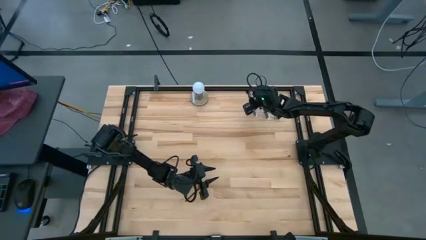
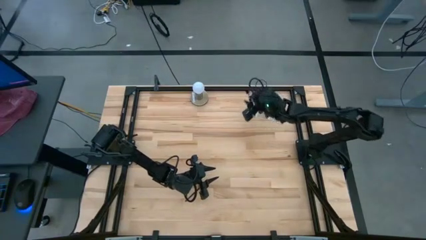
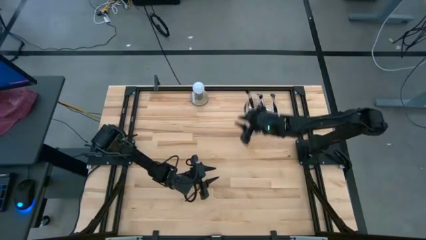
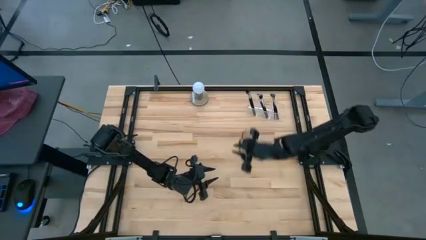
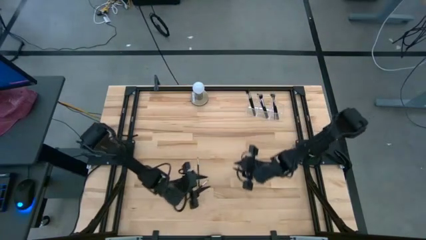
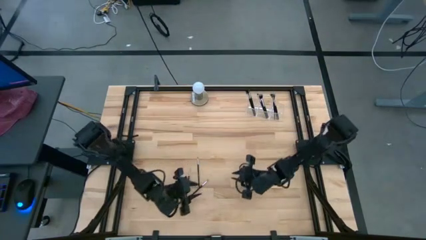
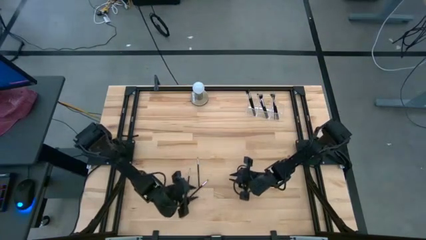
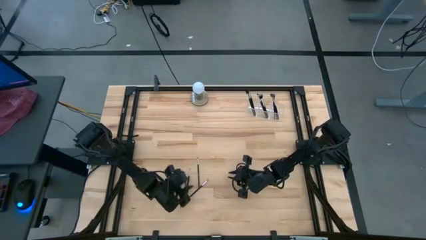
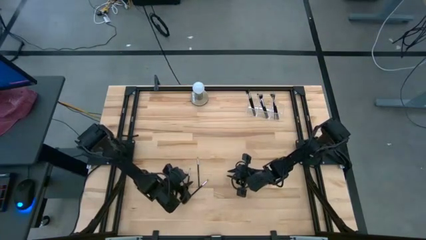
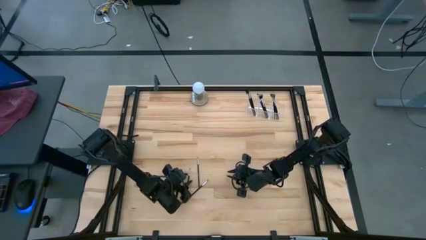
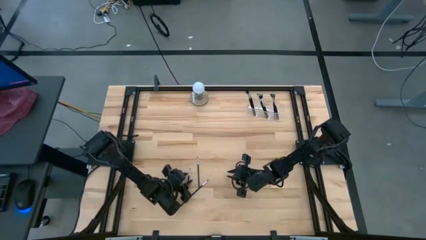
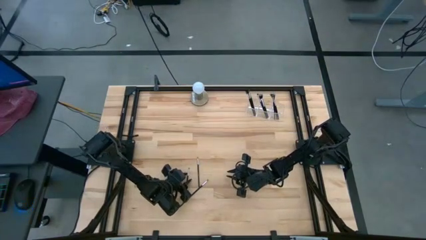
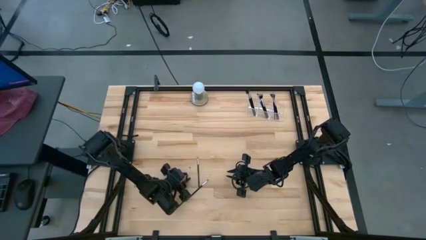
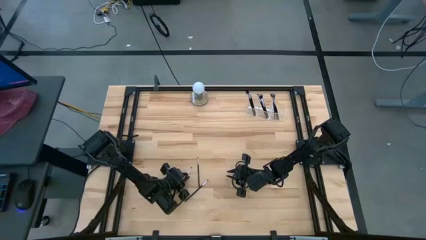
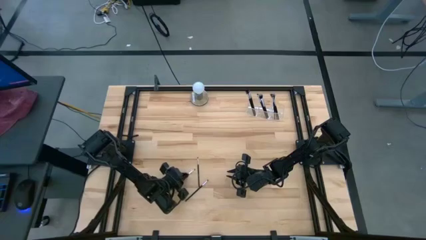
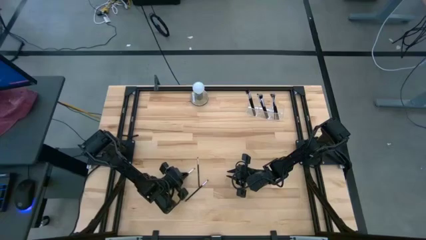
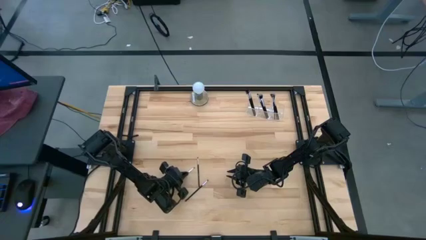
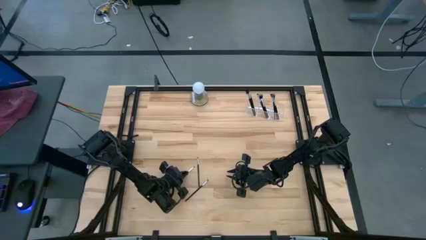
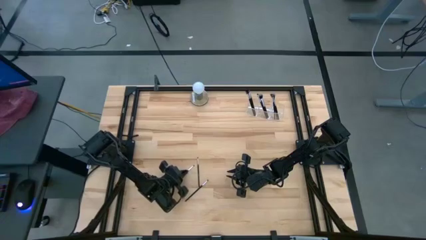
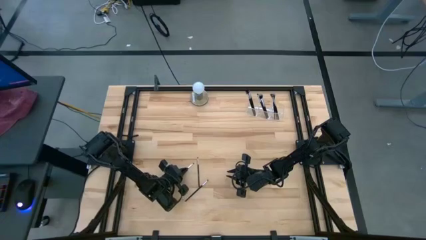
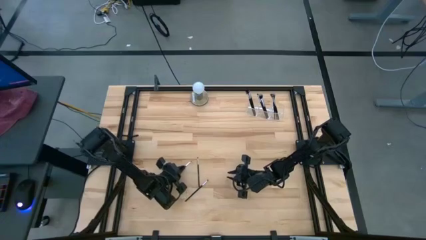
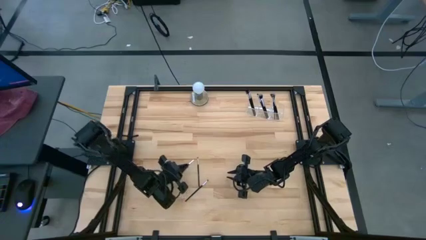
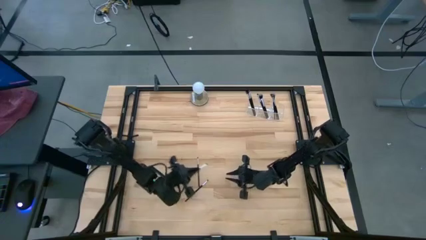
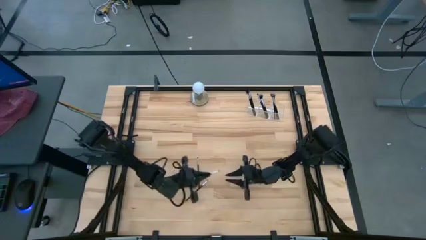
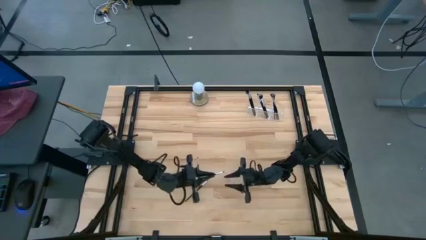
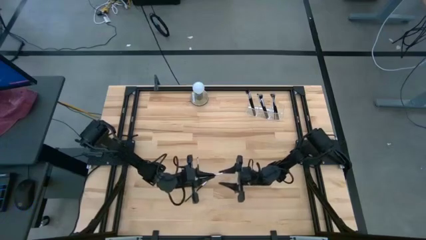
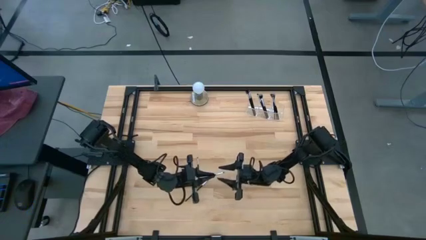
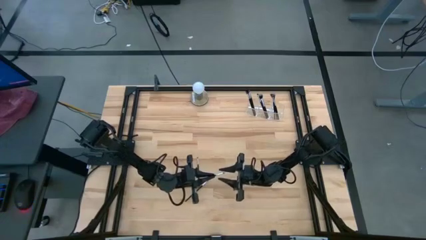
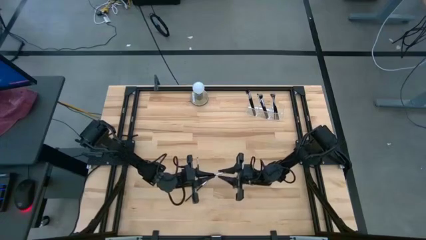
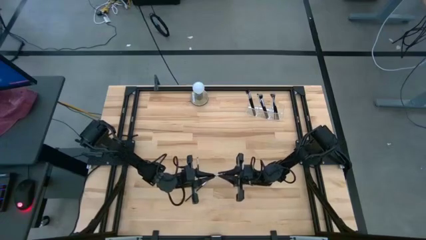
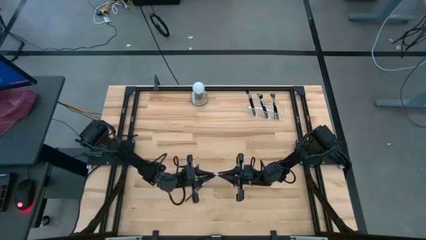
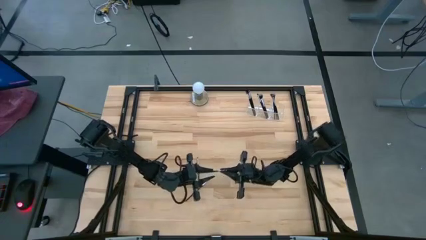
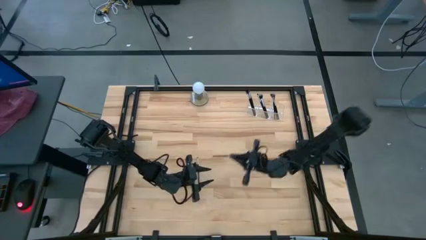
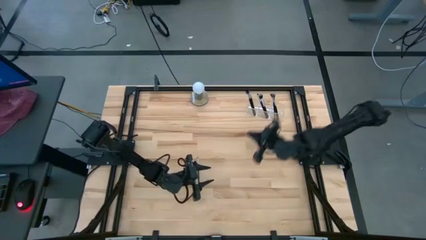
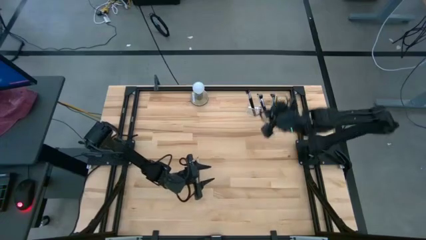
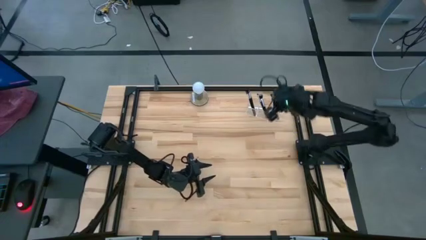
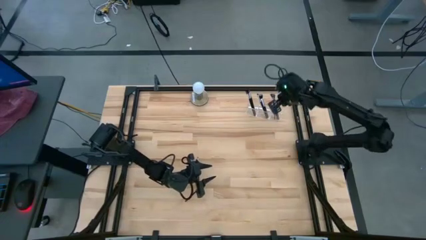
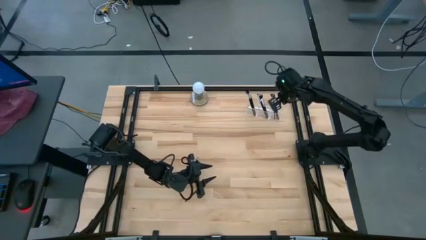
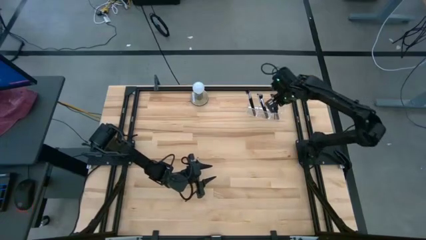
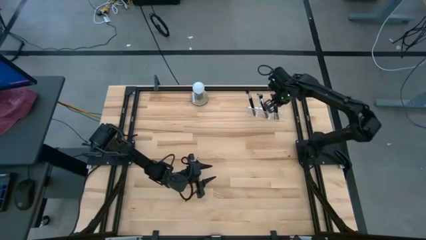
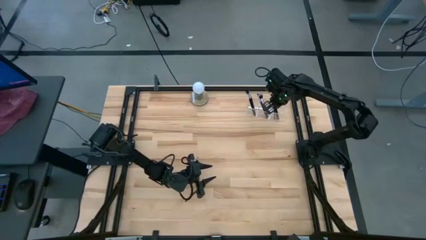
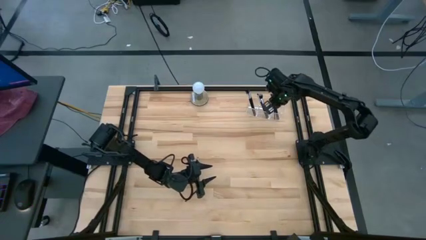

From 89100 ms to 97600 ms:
Task: Put items in baskets/containers
Put the silver eyeshadow brush into the transparent organizer

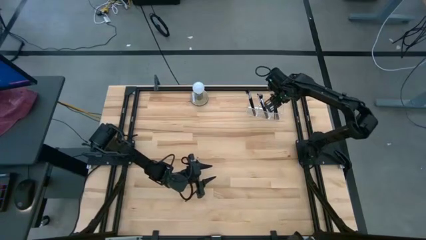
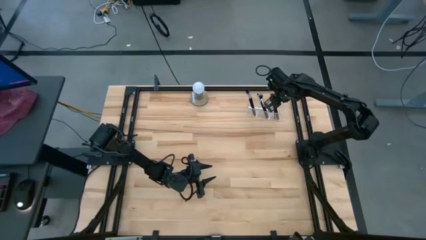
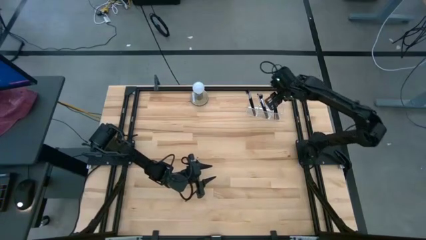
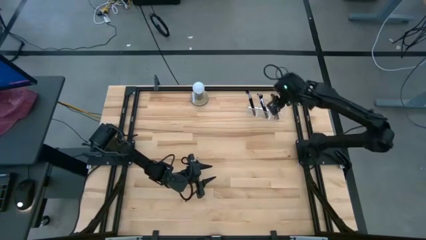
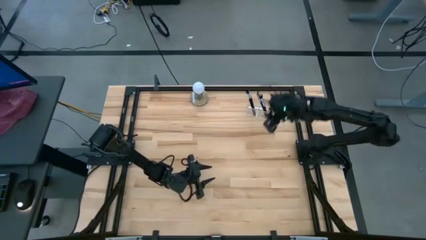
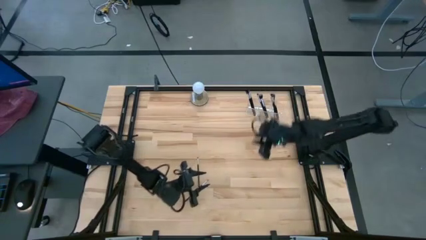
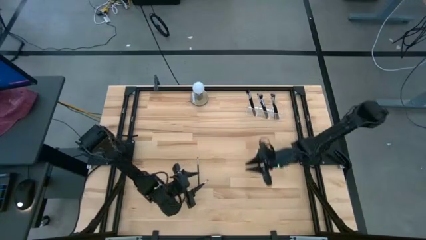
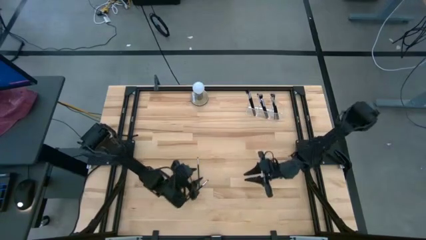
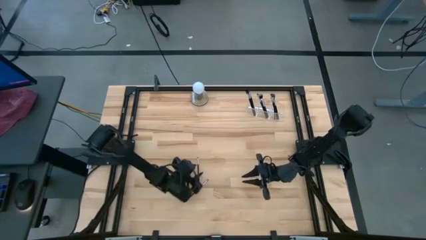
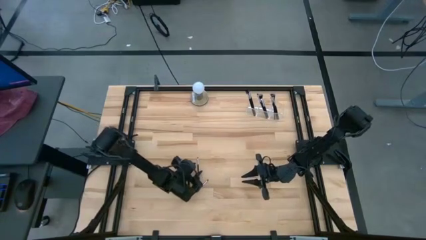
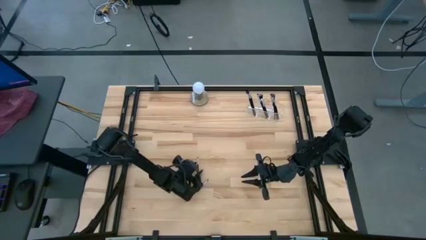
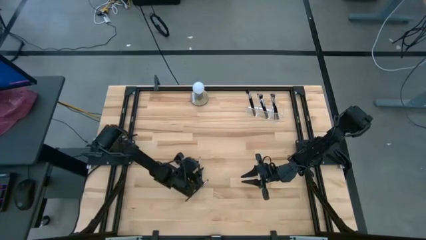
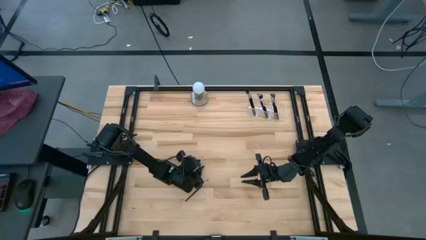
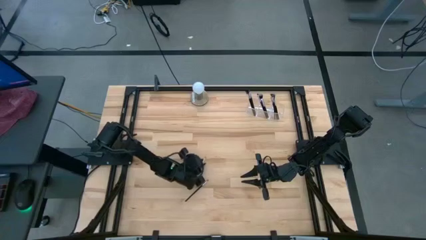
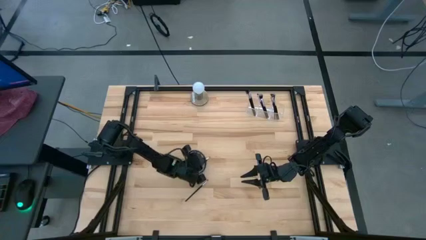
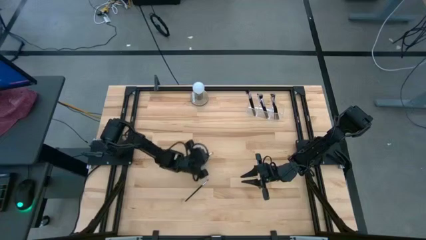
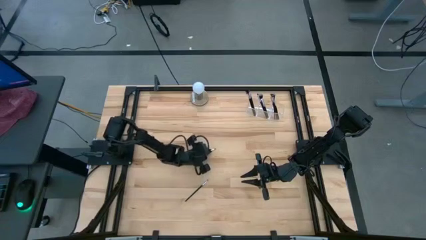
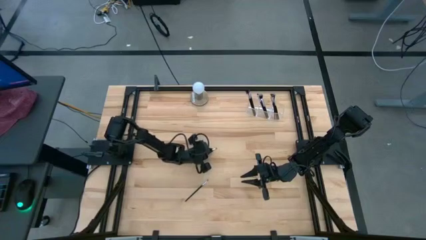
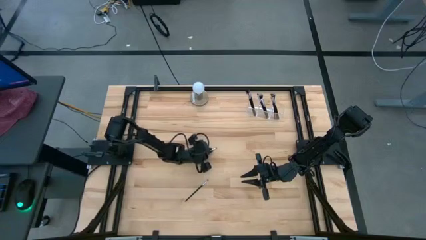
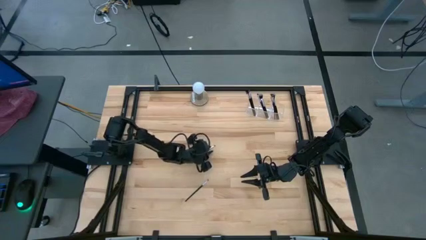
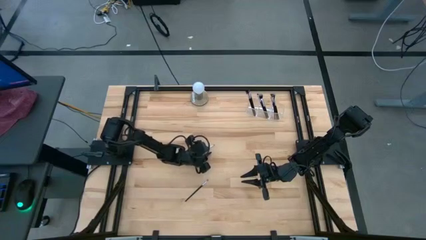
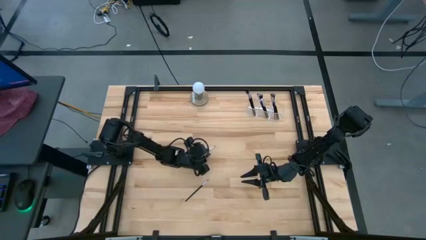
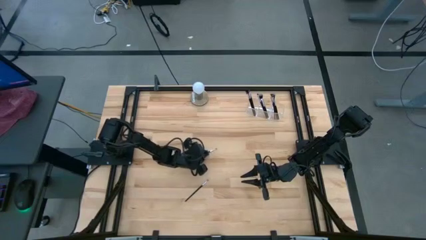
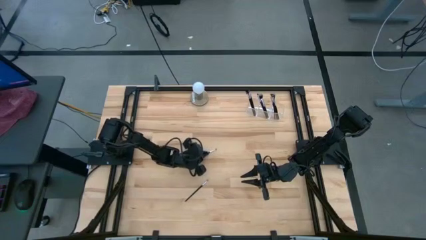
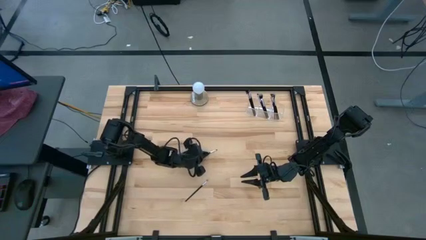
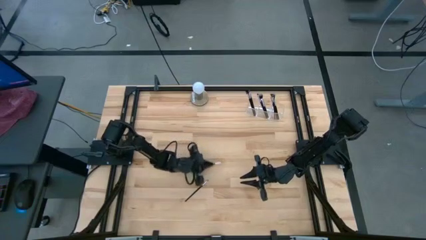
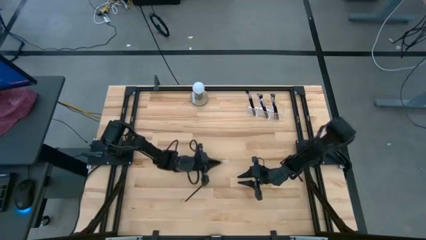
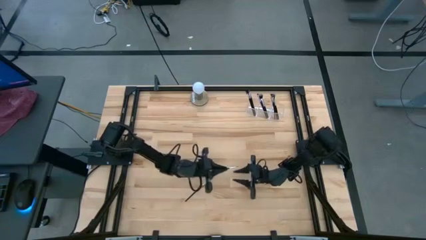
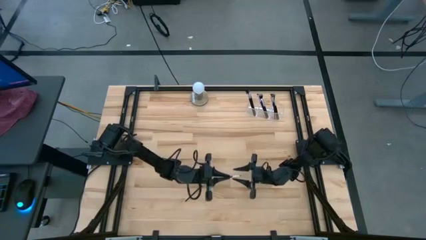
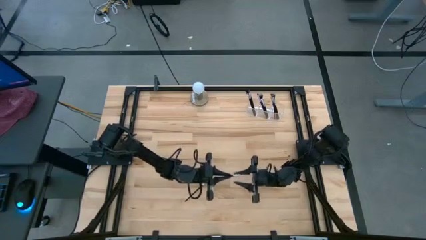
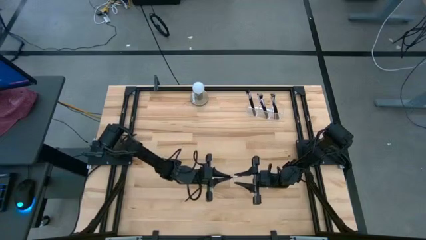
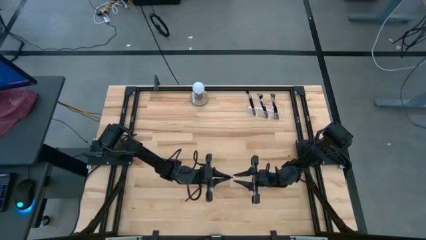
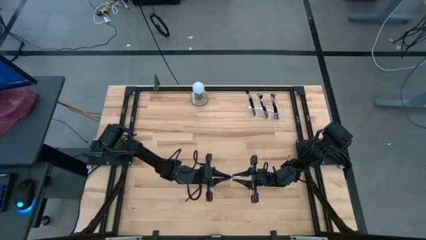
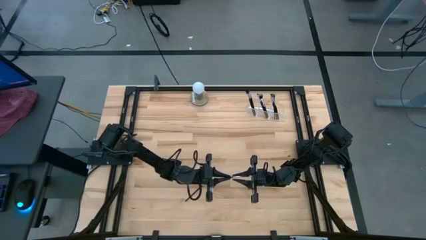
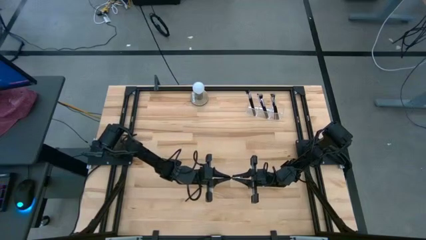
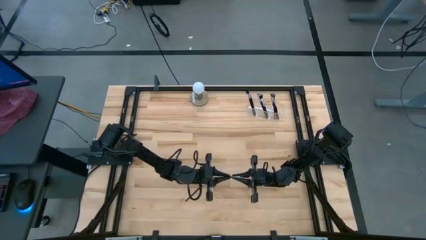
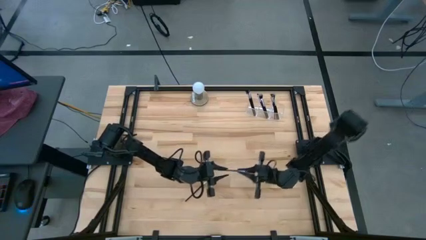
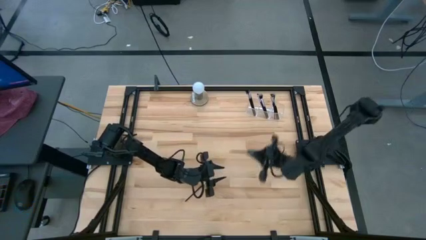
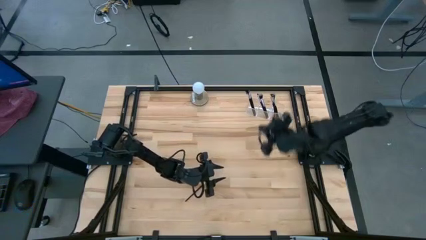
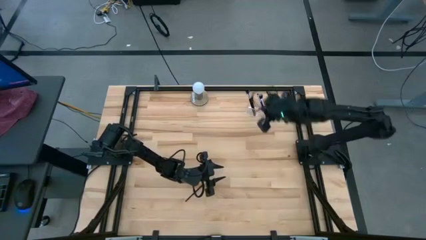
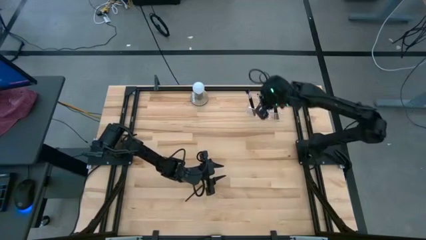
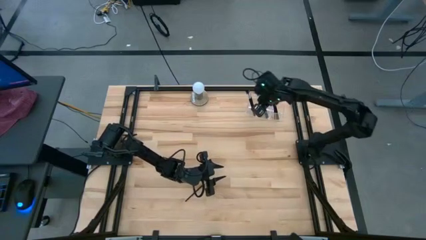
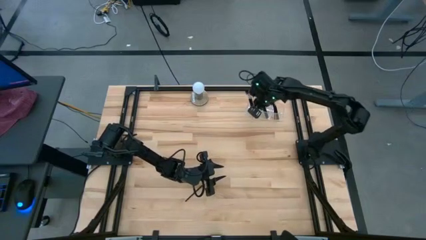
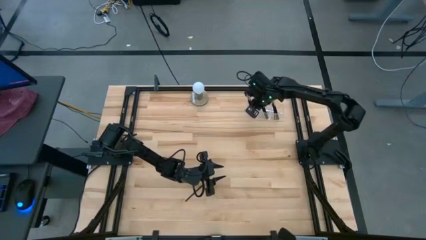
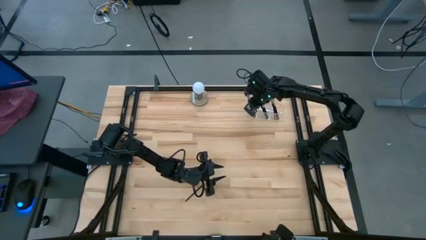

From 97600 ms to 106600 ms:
Put the silver eyeshadow brush into the transparent organizer
